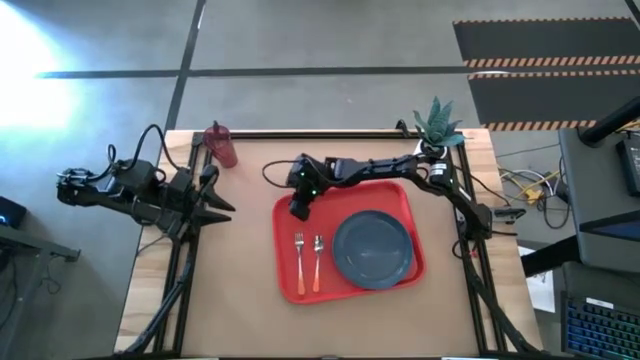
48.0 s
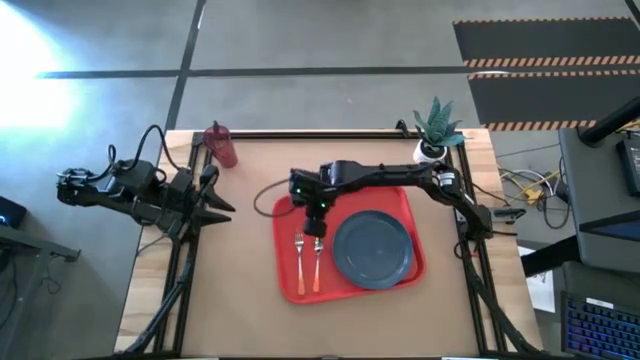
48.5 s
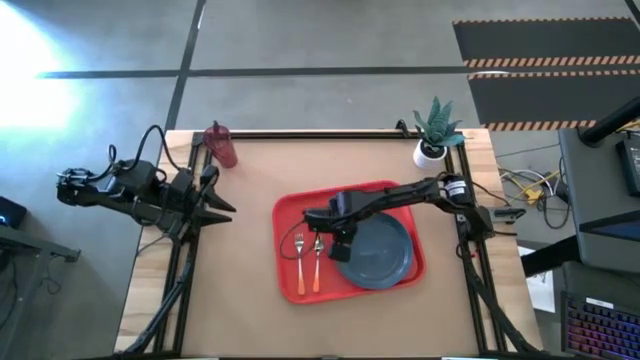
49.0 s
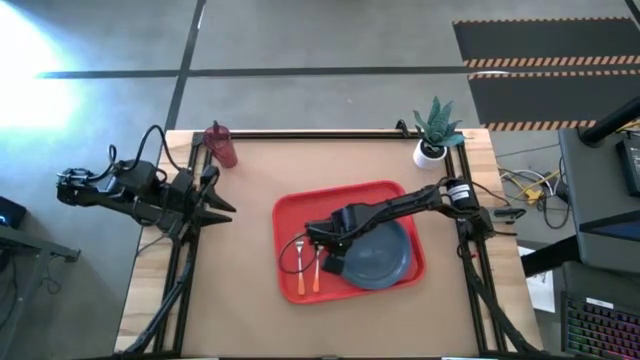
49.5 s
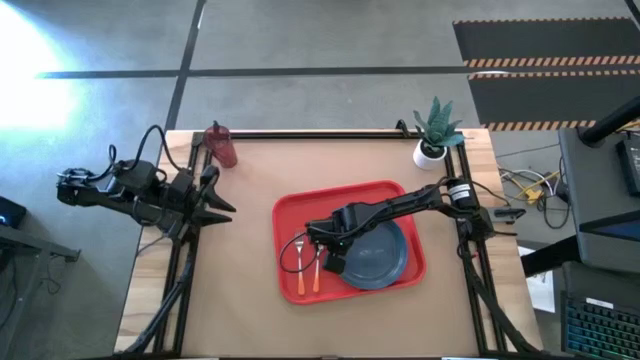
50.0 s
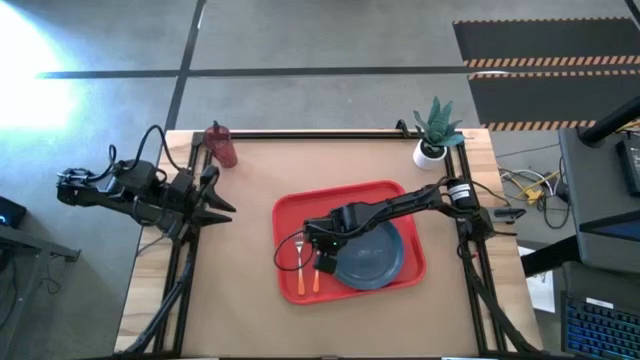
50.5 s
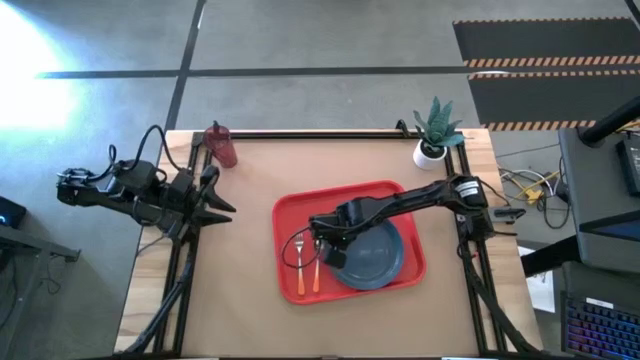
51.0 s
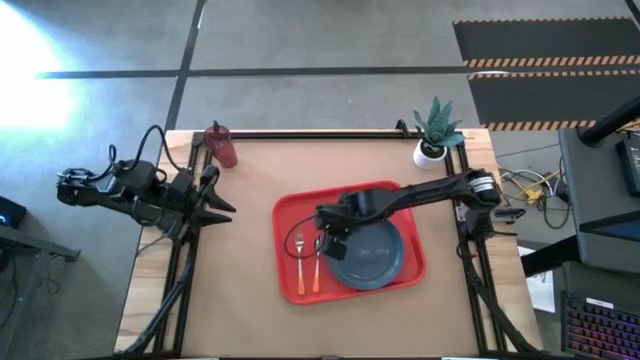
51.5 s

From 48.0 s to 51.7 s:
Task: Pick and place plate/cup/fork/spoon on tray
Adjust the blue plate on the orange serving tray

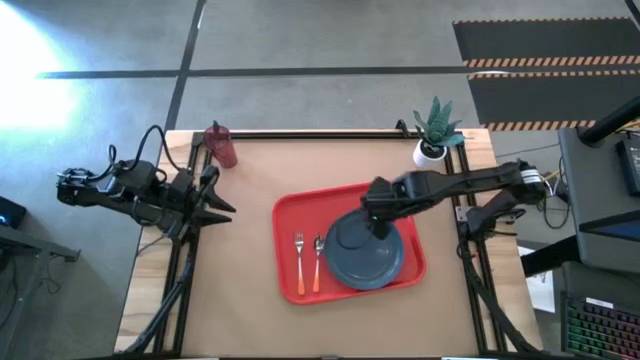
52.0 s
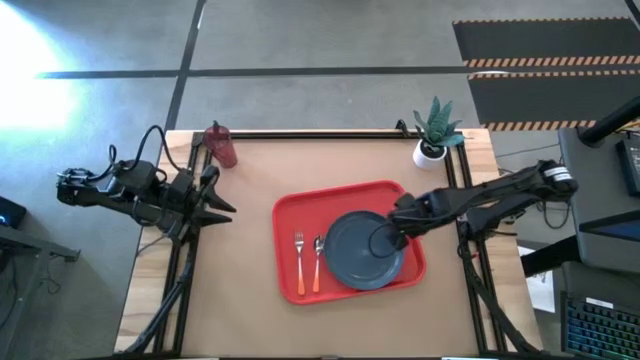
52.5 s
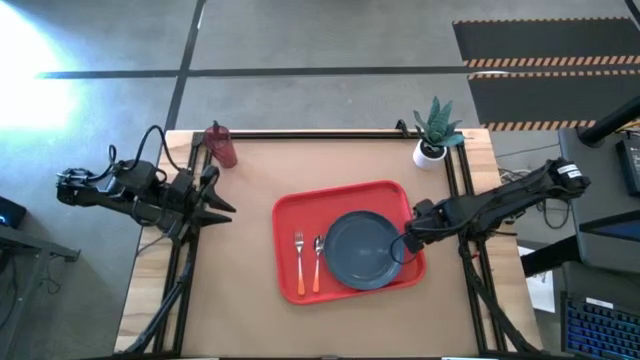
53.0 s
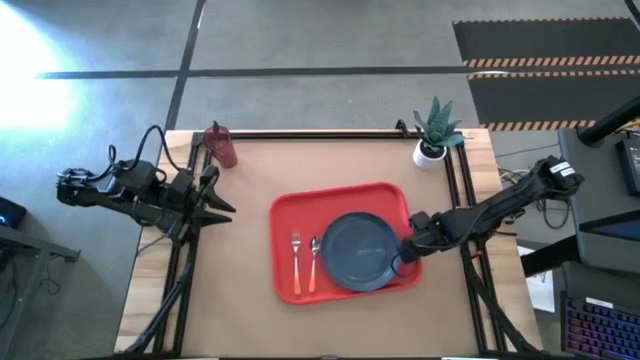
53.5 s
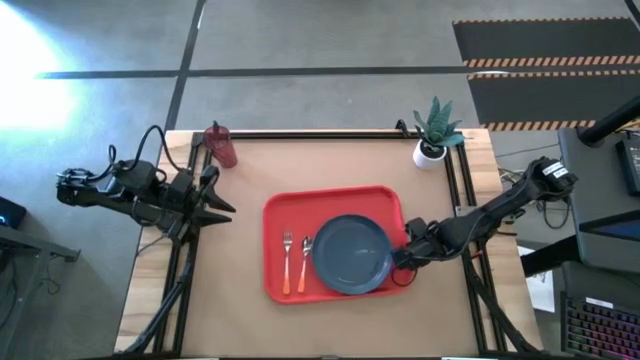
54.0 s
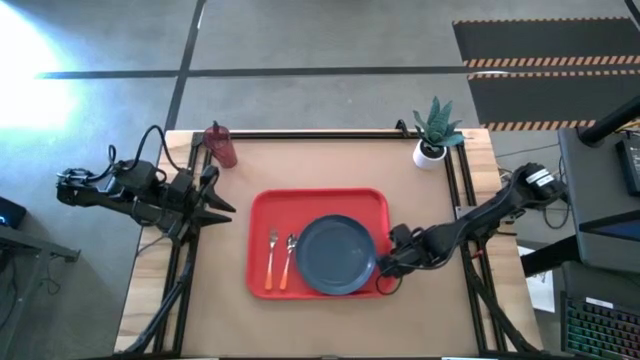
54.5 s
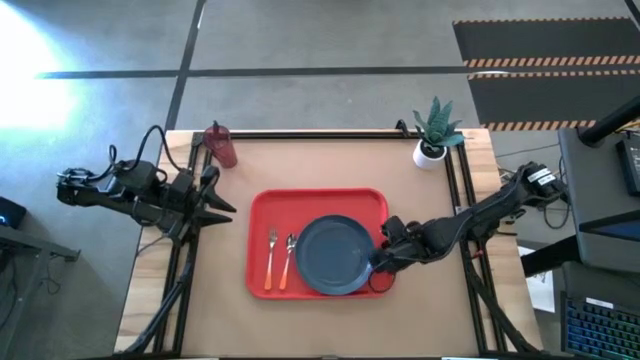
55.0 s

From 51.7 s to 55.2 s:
Adjust the orange serving tray on the table

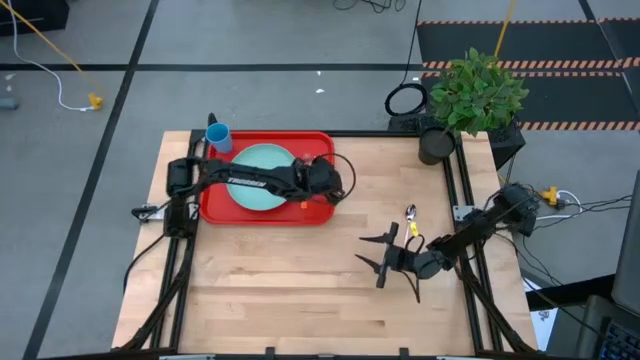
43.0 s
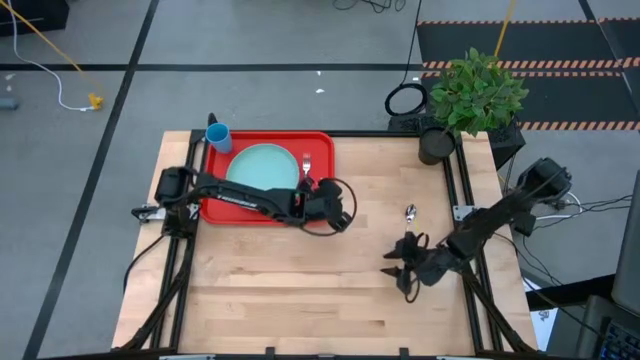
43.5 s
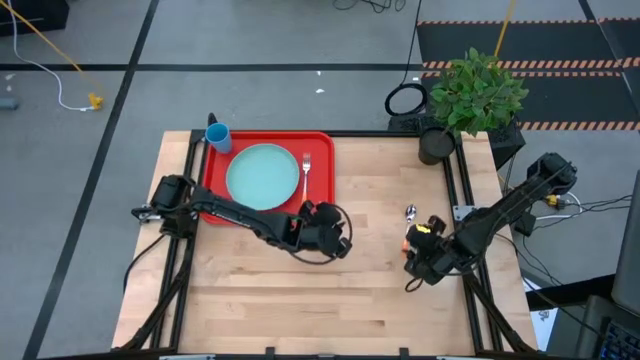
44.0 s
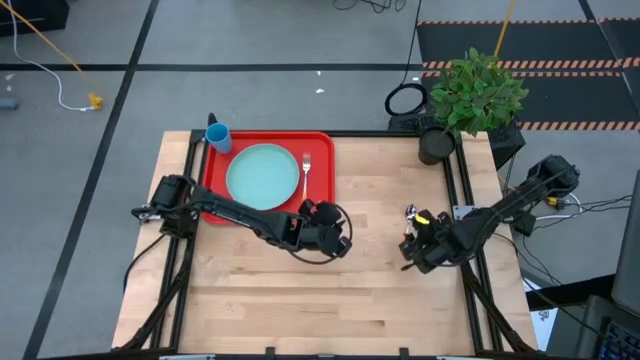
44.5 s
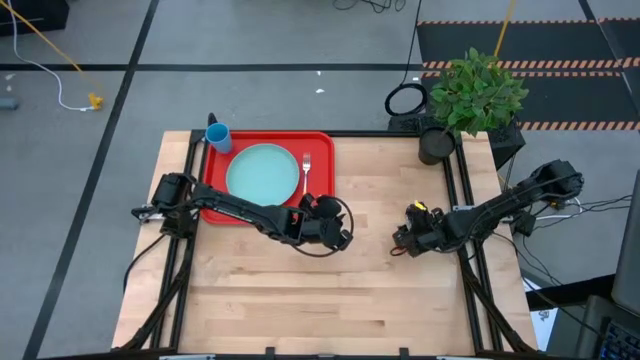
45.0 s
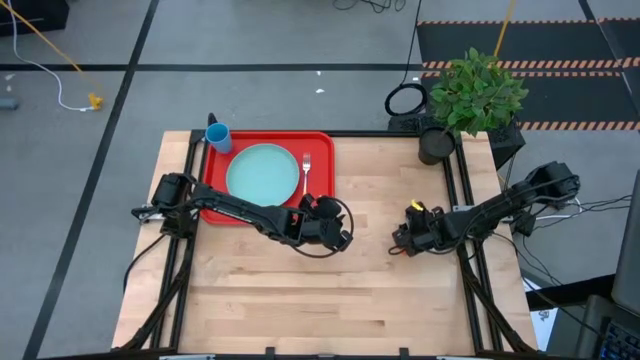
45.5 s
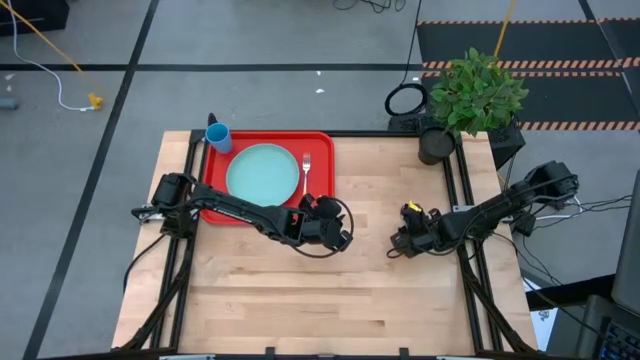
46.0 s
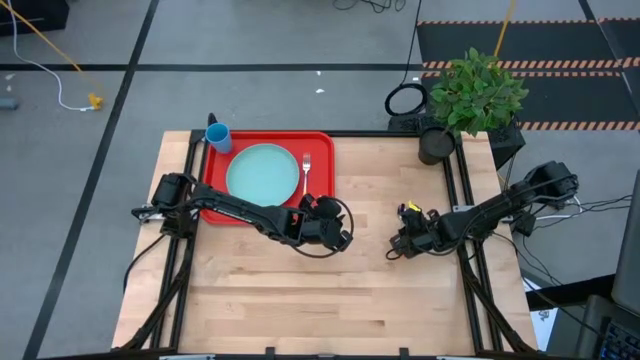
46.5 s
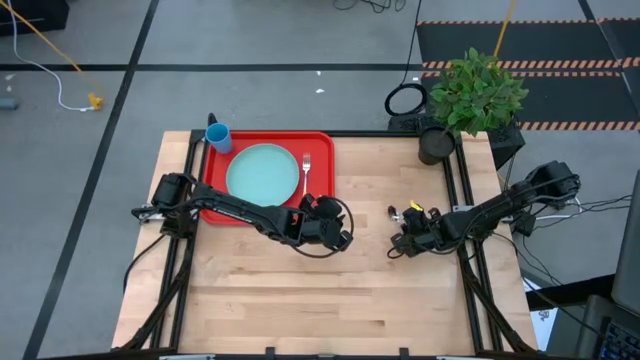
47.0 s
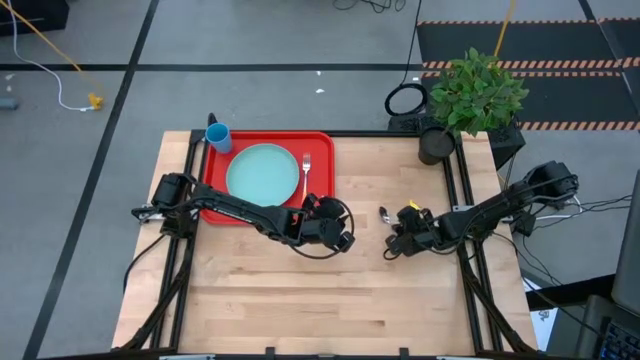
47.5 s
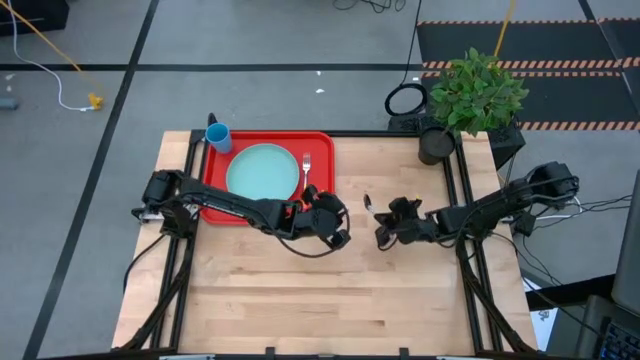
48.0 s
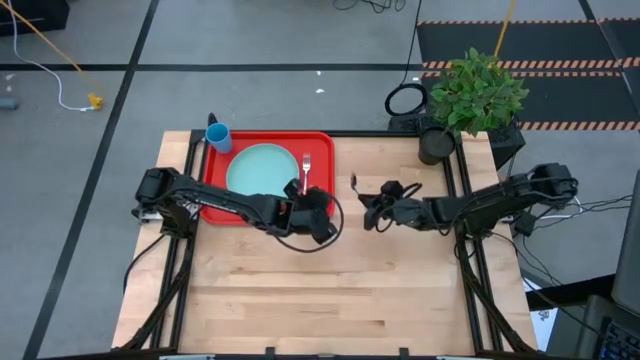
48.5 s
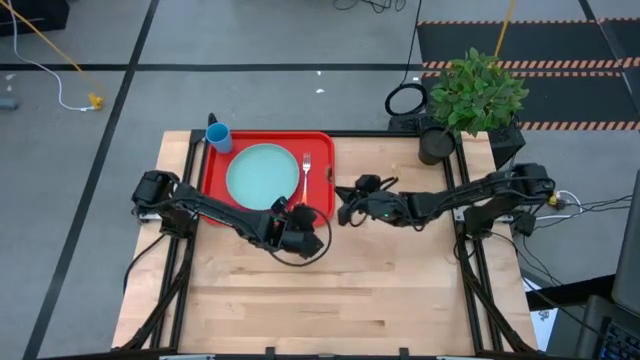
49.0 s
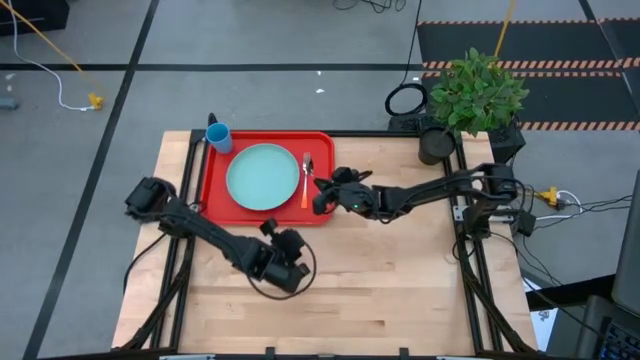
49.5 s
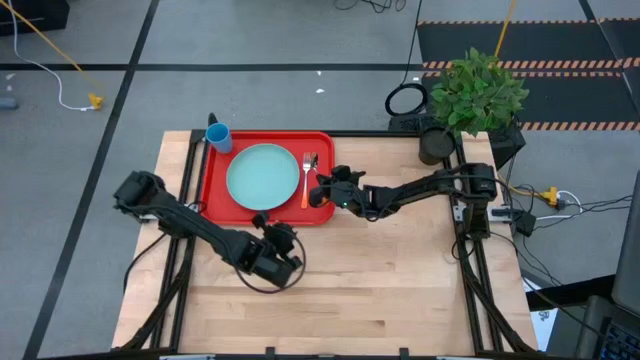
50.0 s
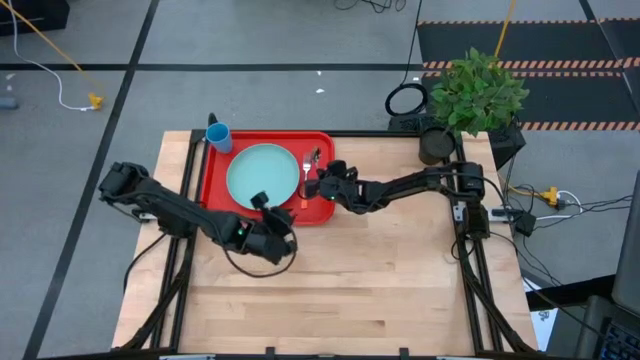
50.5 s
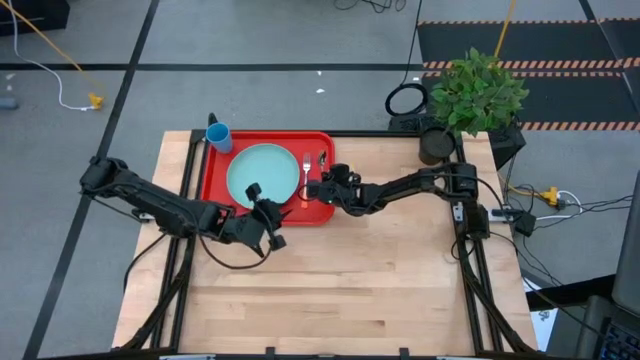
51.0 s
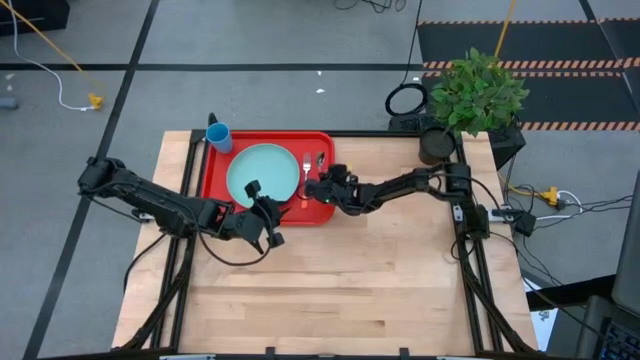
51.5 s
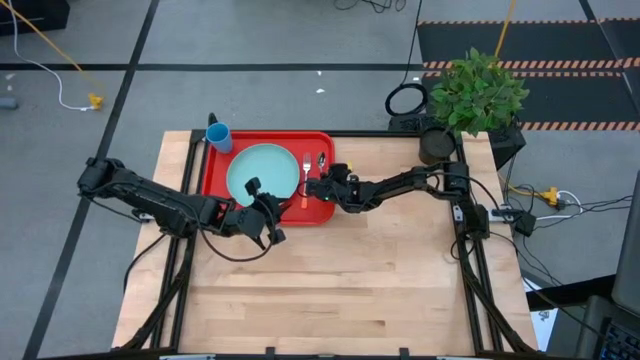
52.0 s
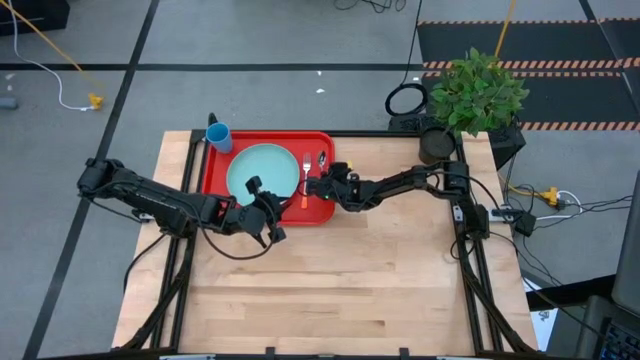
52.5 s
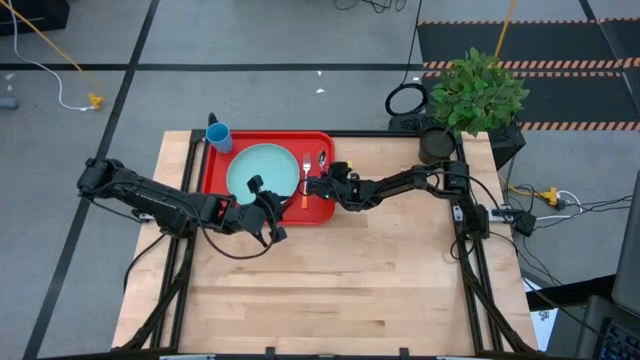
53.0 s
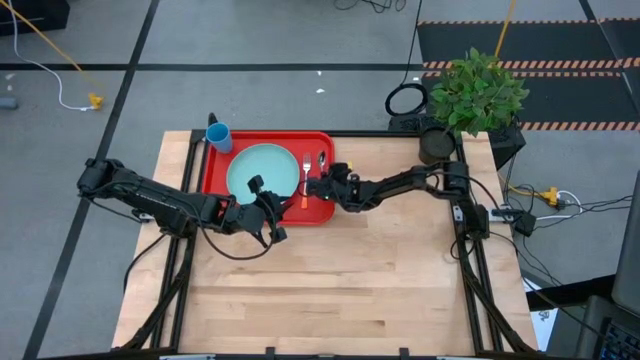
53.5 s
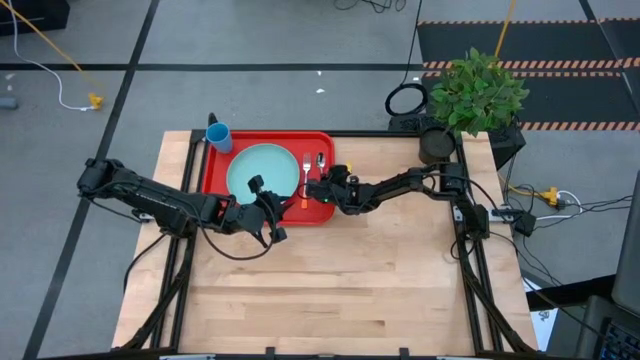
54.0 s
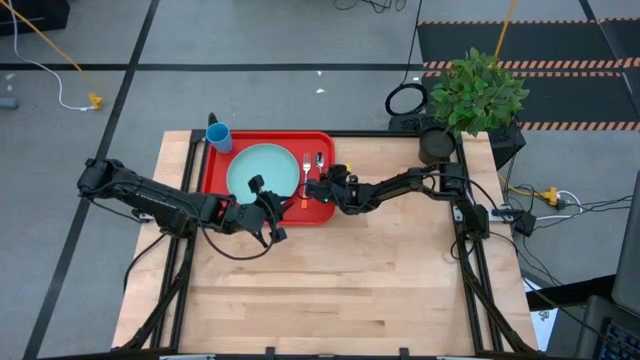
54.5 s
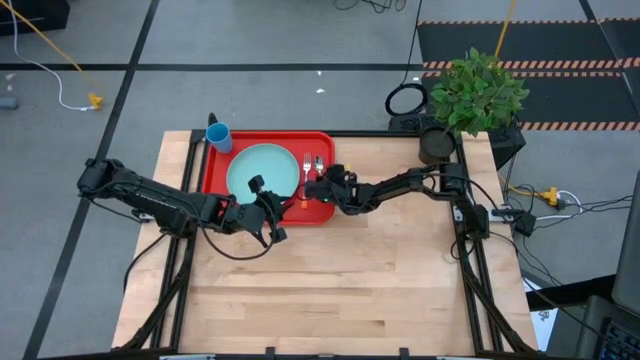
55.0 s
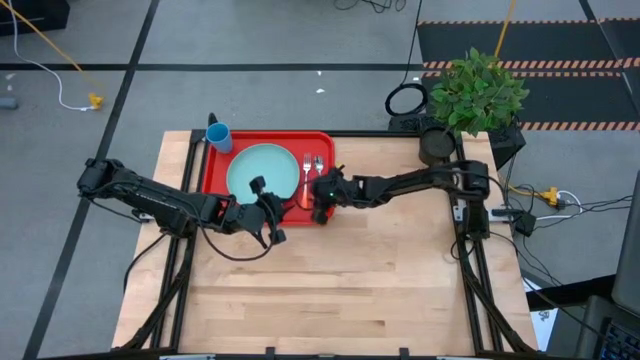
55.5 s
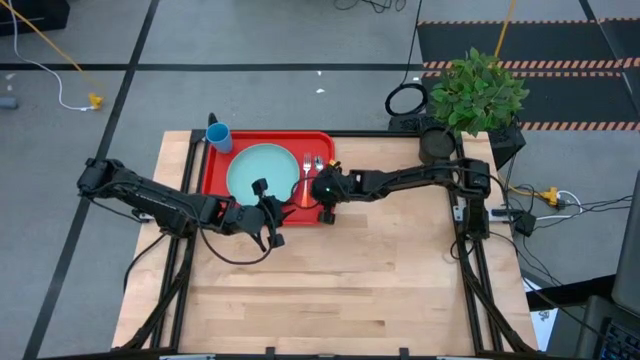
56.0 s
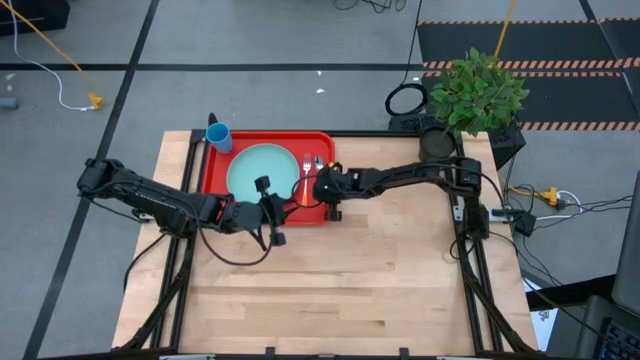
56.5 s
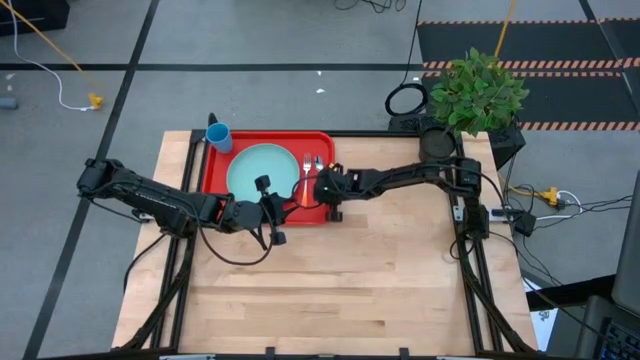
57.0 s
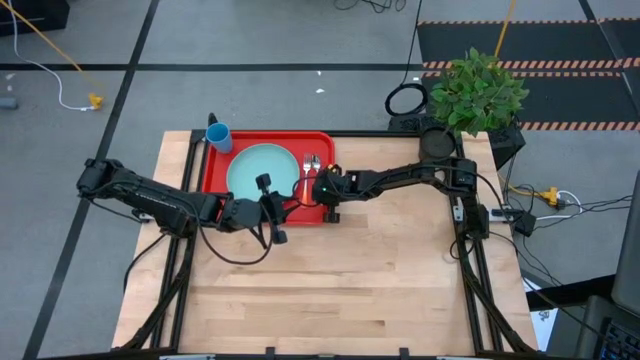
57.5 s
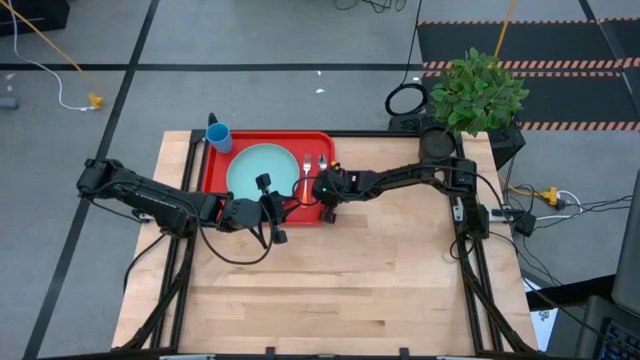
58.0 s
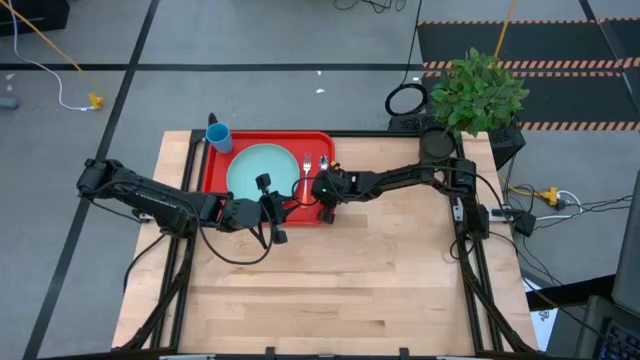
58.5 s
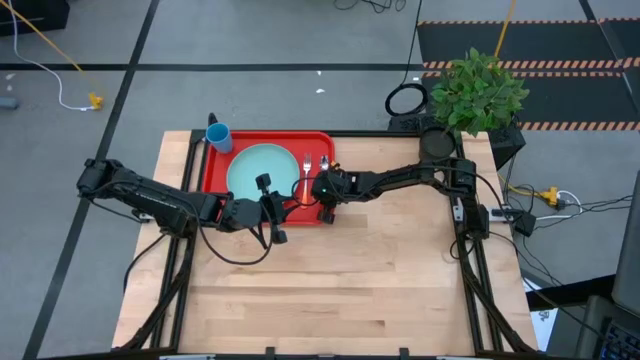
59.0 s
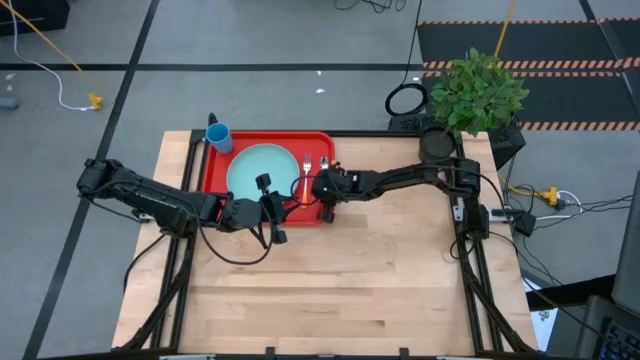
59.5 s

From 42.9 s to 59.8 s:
Task: Pick and place plate/cup/fork/spoon on tray
Put the orange spoon on the red serving tray to the right of the orange fork
